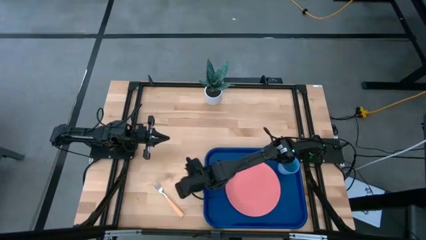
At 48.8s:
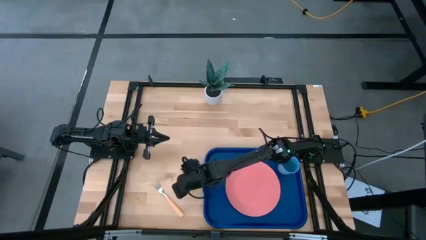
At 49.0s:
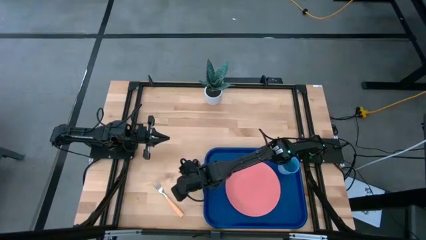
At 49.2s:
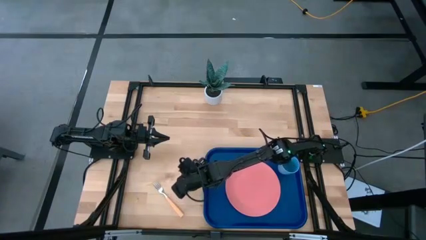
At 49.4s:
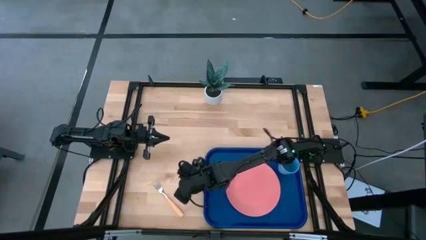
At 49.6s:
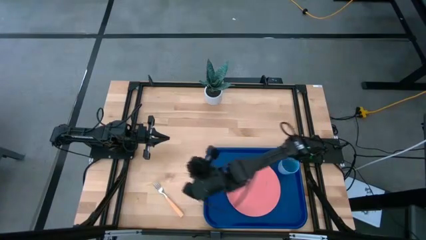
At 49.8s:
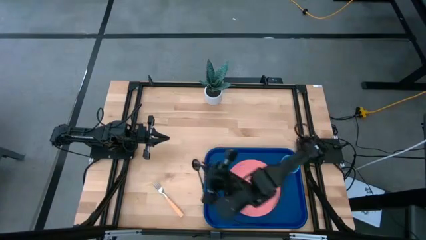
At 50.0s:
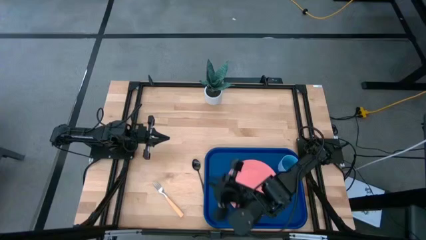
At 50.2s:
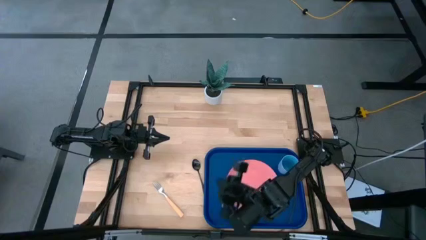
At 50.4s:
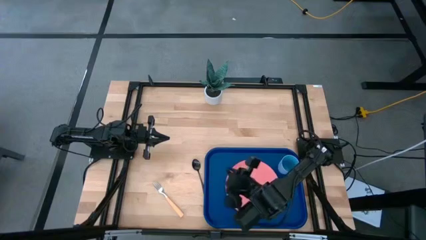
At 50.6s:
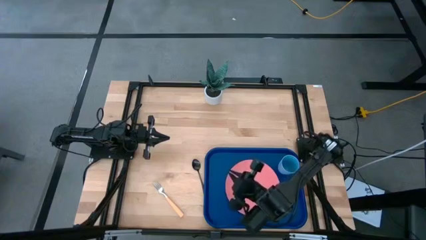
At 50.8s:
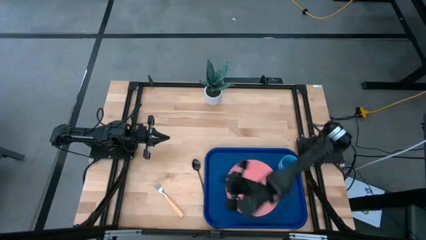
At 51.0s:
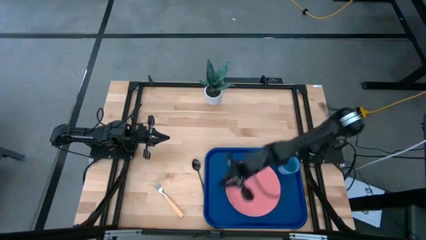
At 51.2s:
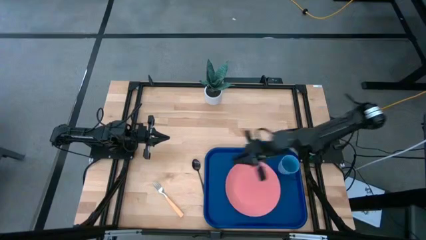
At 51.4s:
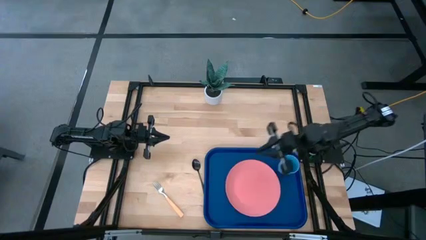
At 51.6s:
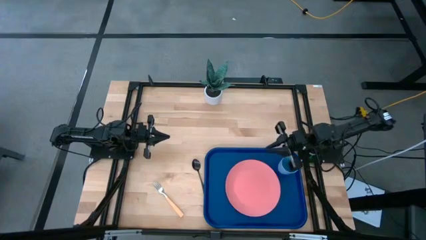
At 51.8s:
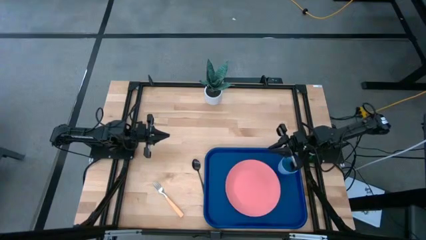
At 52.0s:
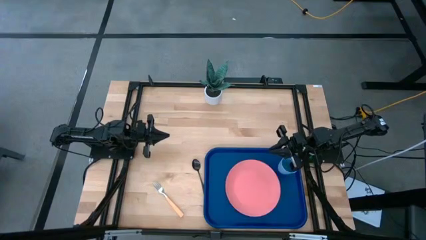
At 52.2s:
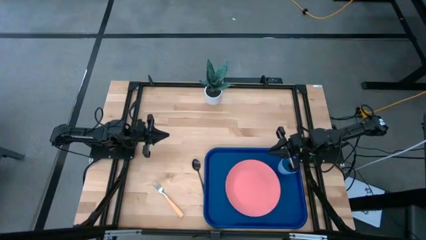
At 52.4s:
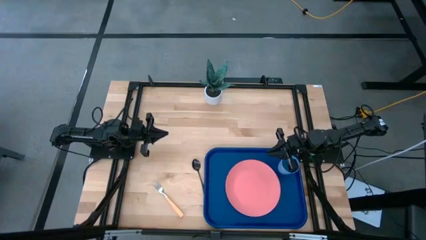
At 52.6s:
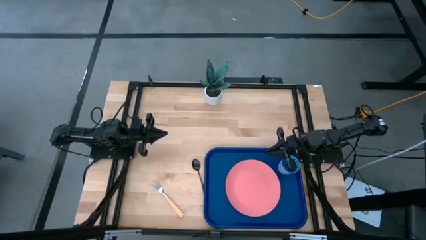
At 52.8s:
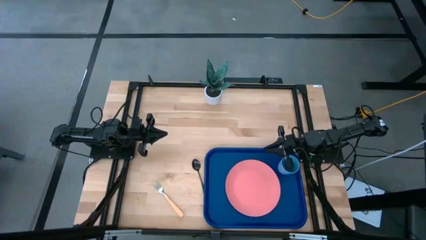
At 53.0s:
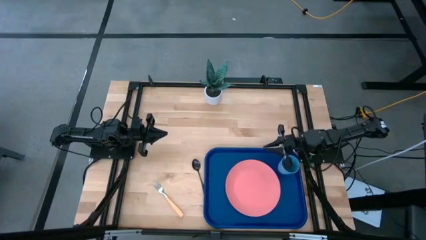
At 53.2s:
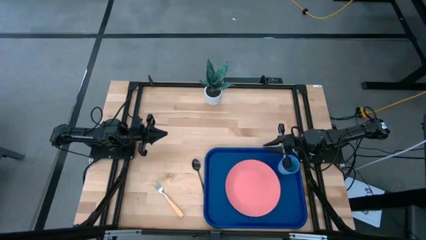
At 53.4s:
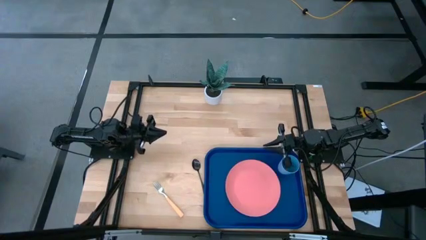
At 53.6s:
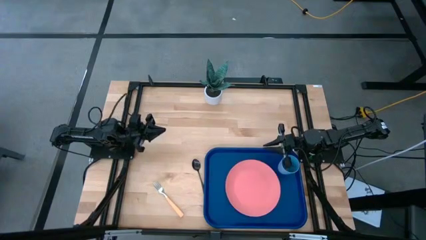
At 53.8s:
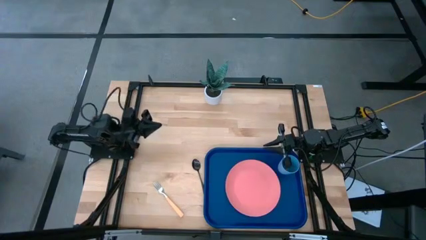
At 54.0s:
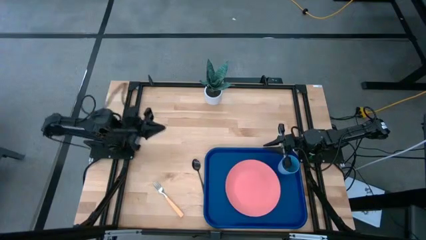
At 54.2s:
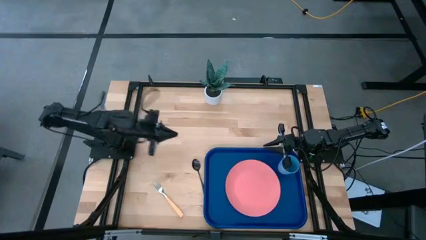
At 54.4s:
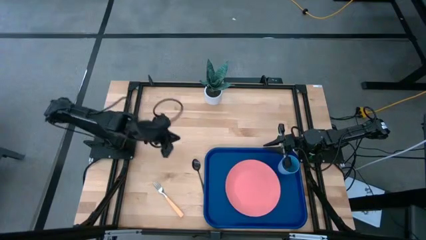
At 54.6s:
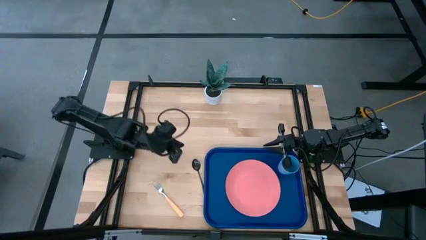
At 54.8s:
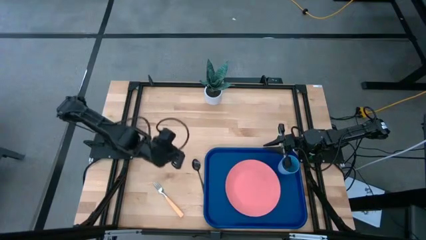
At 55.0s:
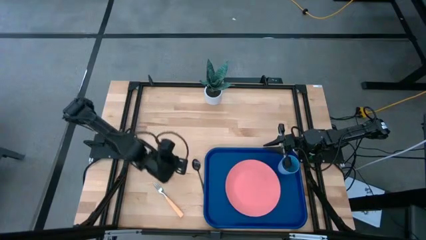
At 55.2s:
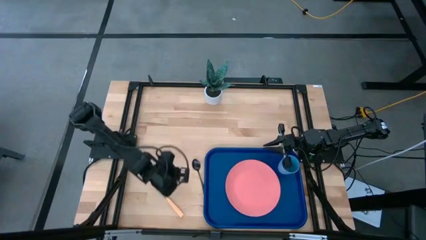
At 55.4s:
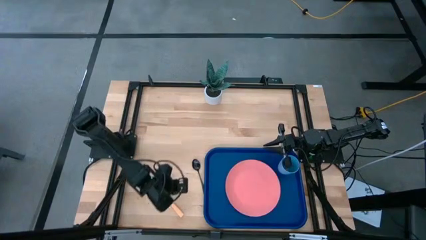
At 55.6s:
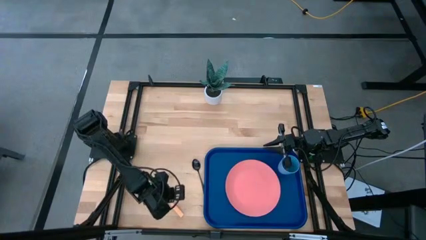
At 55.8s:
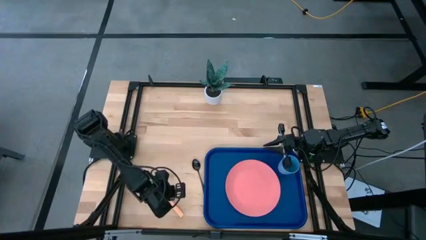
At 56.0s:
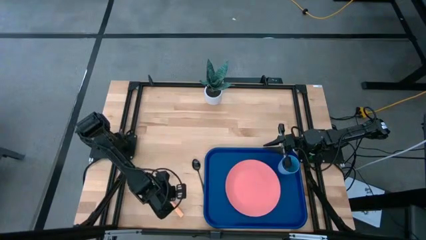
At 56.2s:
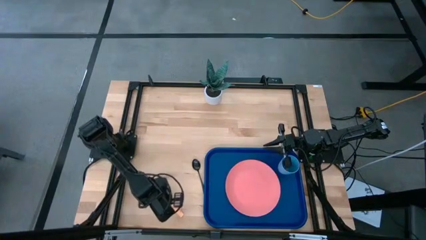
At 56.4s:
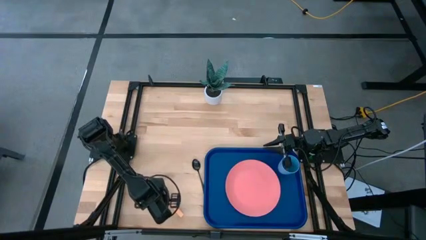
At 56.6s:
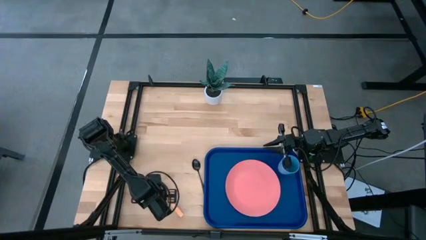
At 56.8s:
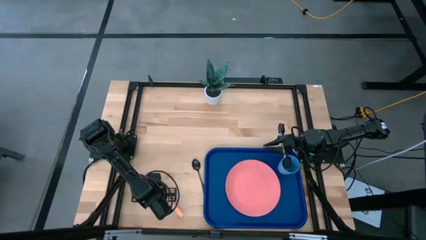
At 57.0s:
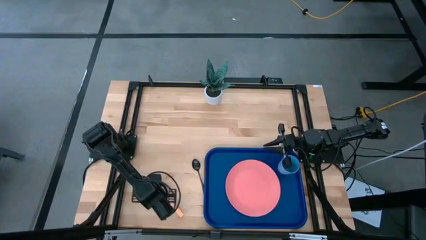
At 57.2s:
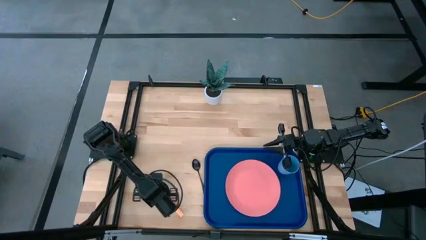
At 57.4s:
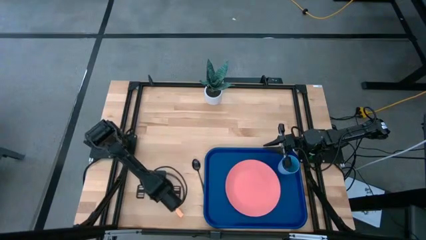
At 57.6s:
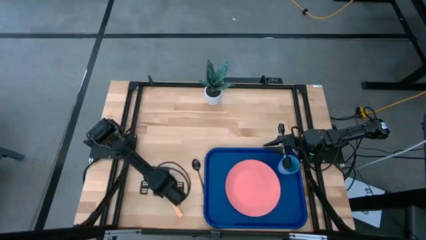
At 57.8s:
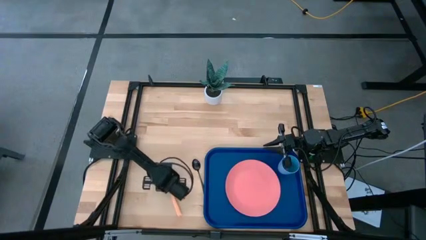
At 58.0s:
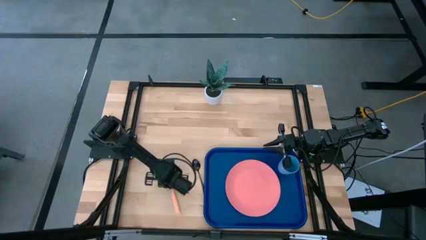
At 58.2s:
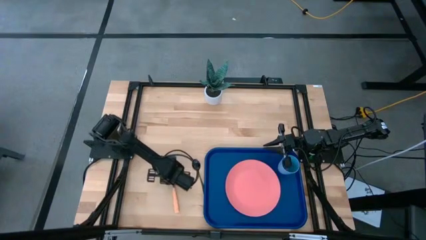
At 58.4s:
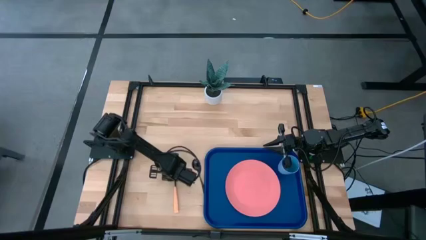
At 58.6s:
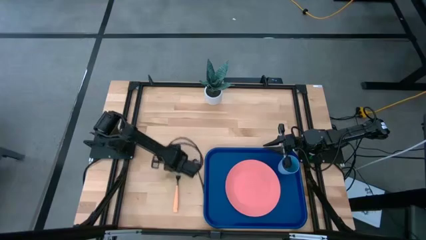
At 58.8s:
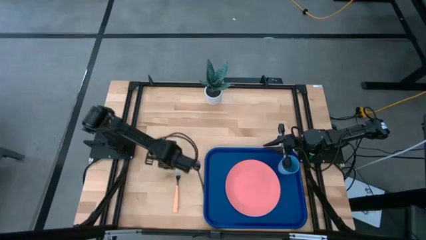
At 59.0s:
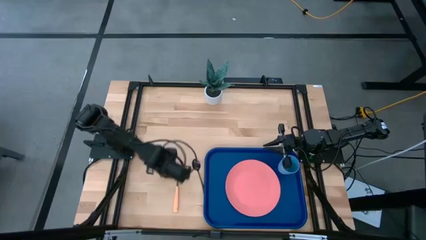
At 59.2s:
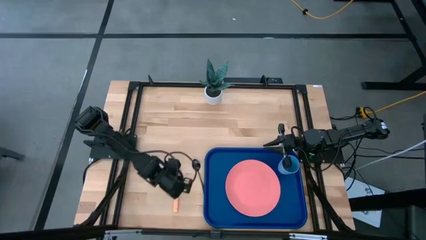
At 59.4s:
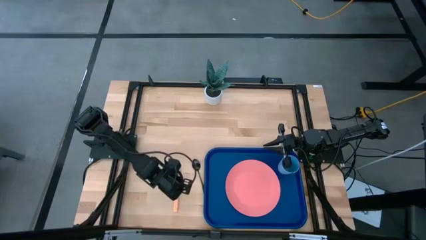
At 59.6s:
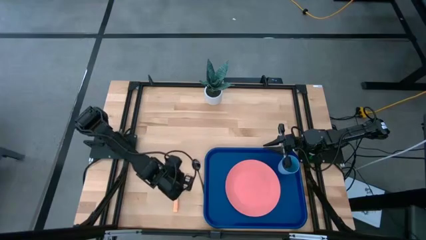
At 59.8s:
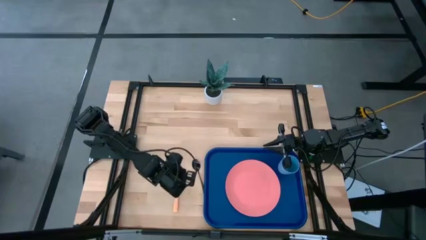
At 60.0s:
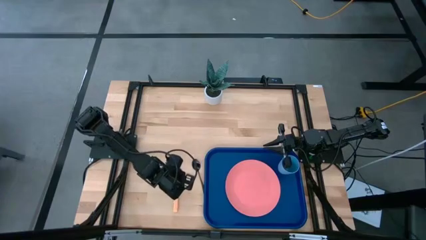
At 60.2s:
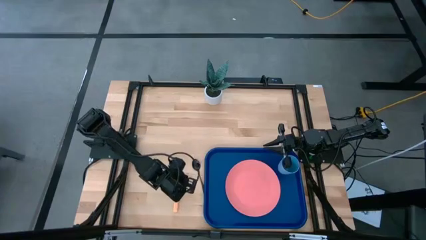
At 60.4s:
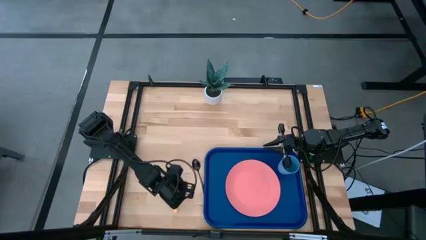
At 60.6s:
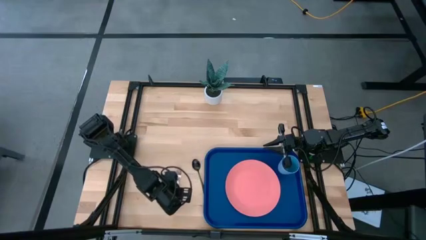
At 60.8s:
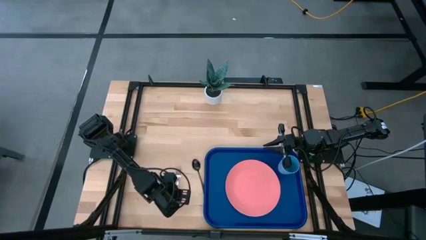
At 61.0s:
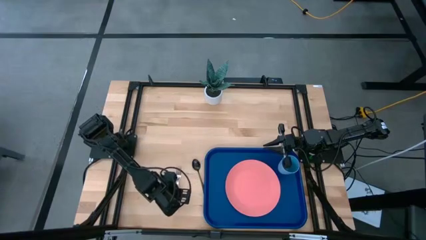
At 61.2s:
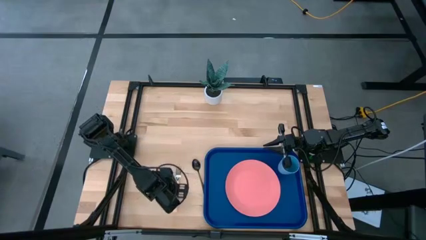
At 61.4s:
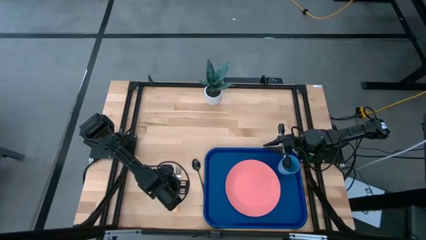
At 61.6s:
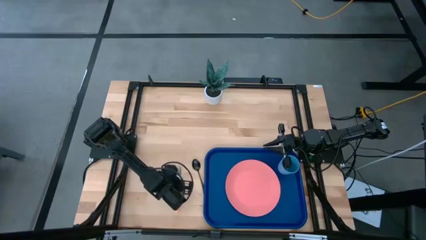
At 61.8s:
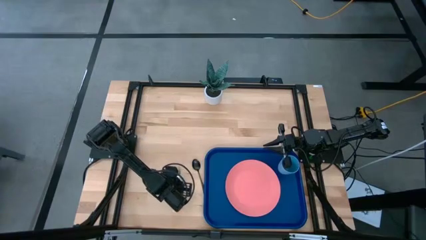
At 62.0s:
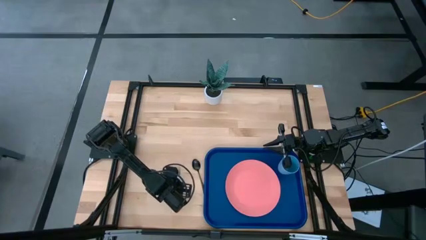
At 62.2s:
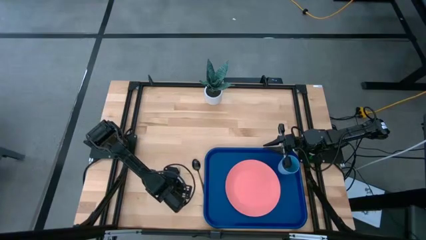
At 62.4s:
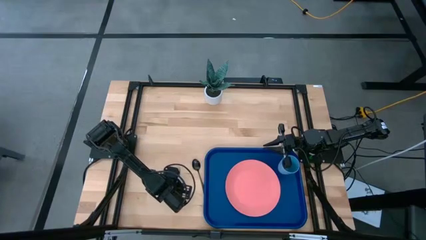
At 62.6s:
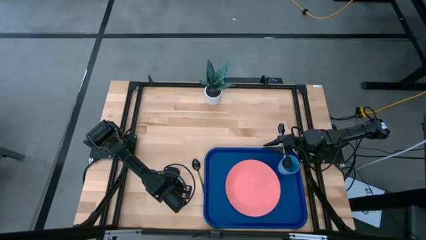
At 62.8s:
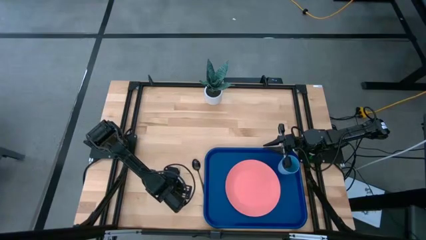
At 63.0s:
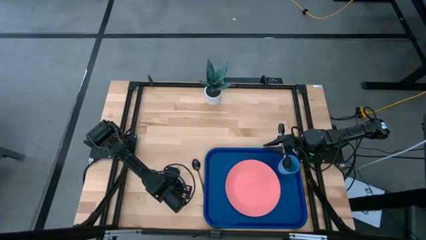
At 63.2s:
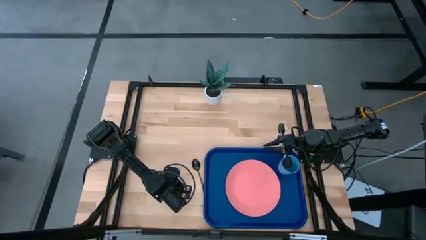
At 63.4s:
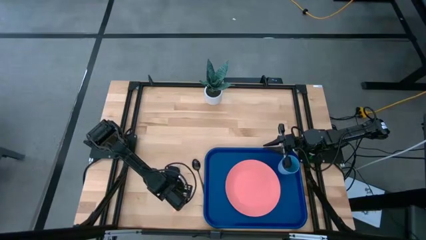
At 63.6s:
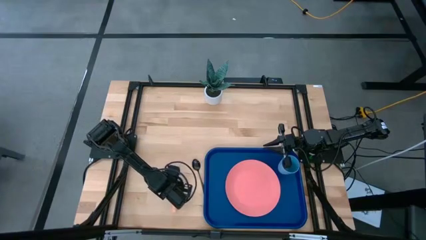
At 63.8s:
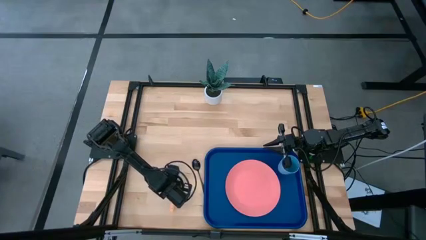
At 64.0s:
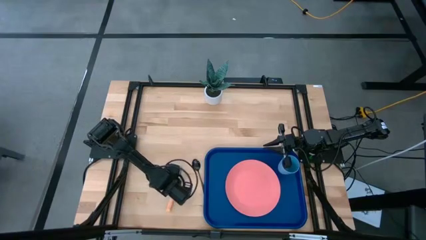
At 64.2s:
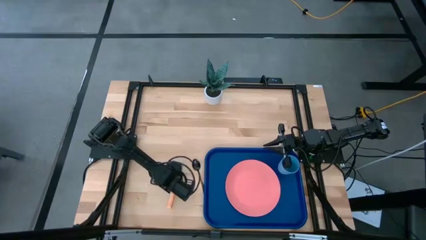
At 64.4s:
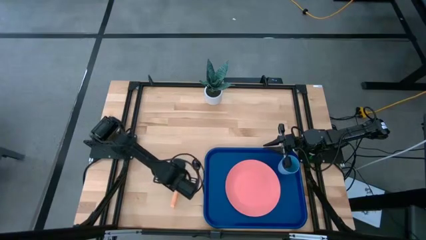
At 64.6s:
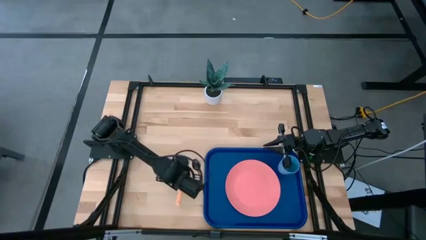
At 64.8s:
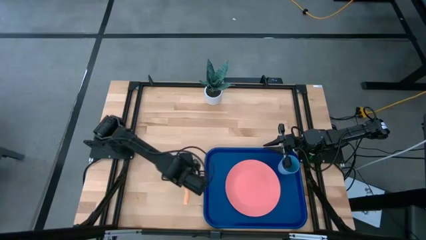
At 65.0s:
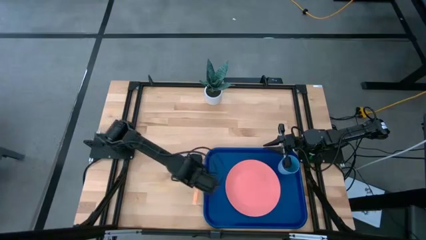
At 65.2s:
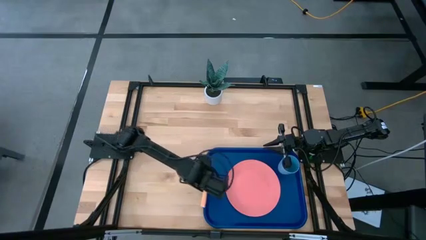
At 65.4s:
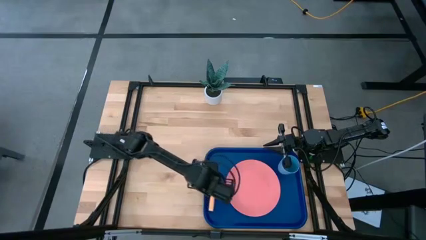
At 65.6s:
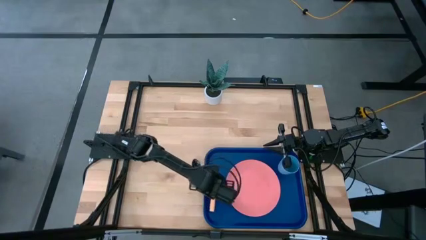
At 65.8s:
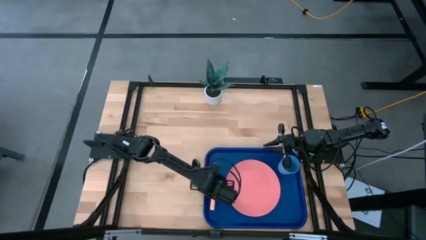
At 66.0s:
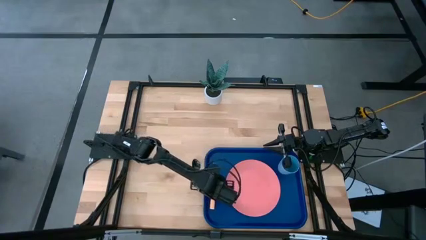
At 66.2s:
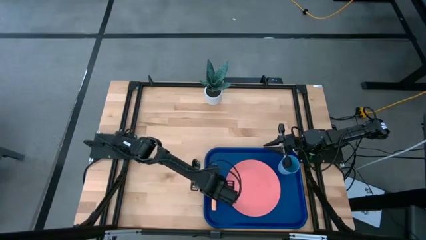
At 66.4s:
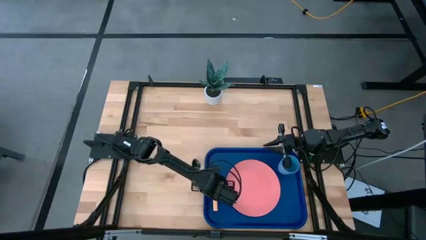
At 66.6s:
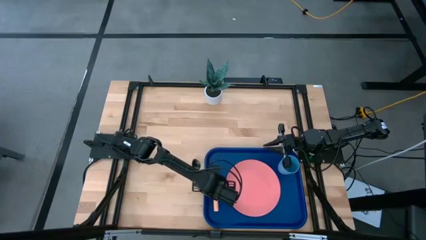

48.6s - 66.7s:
Task: Pick and place plate/cup/fork/spoon on tray
Put the fork on the tray, positioned to the left of the pink plate
